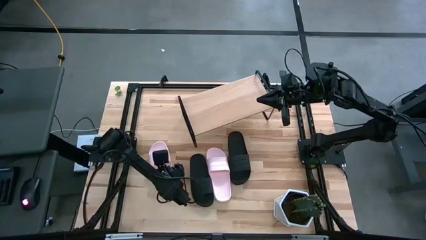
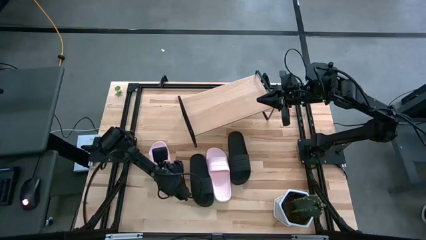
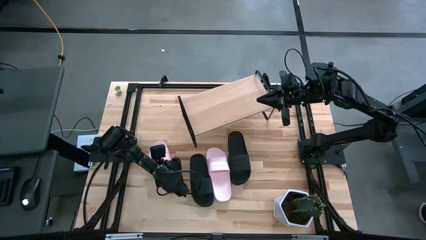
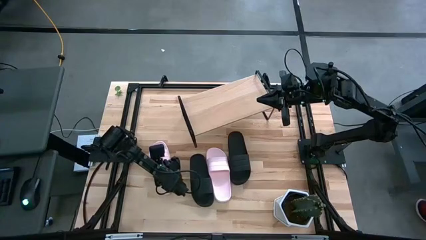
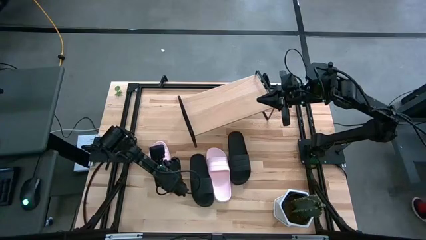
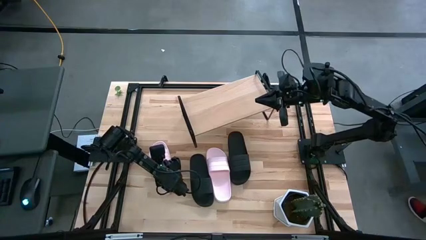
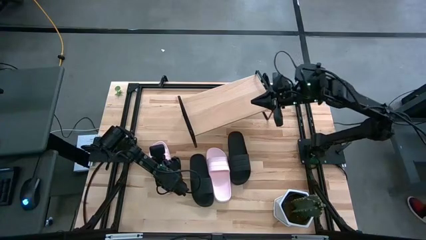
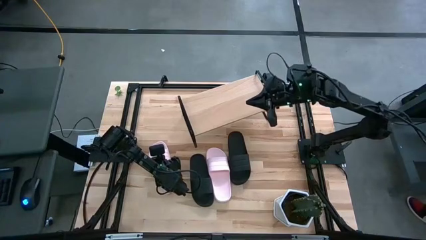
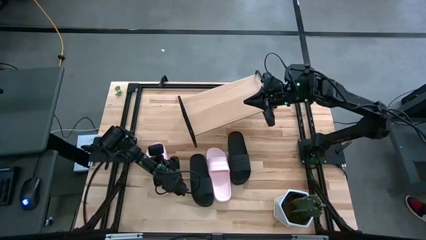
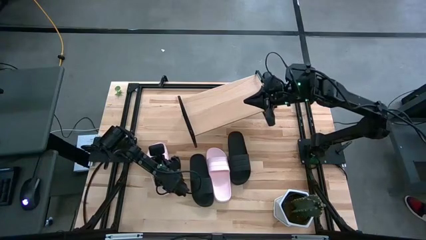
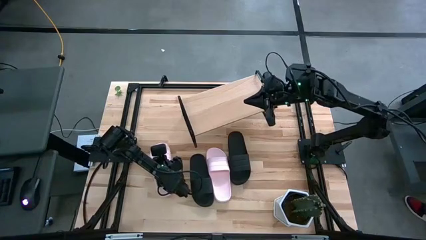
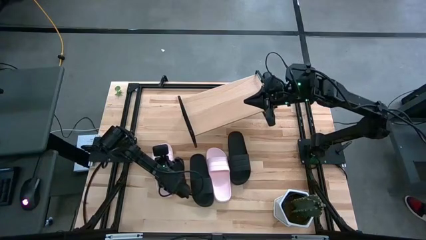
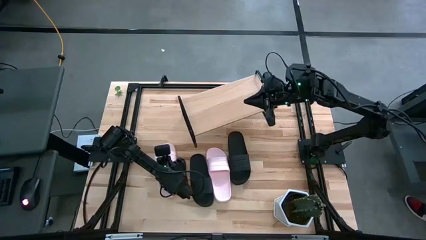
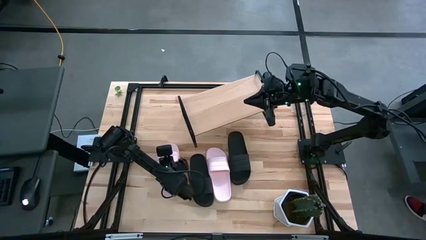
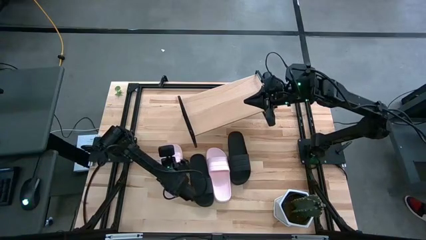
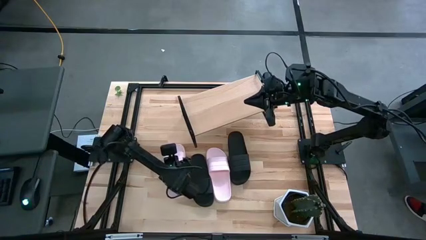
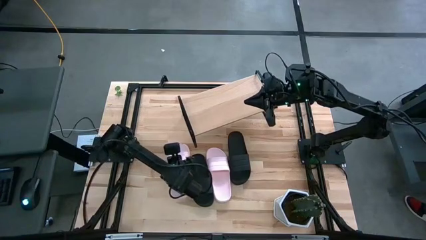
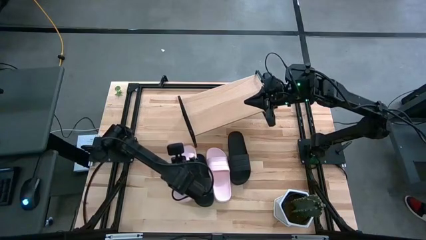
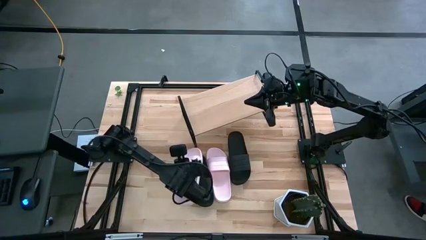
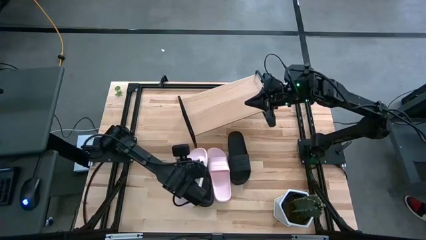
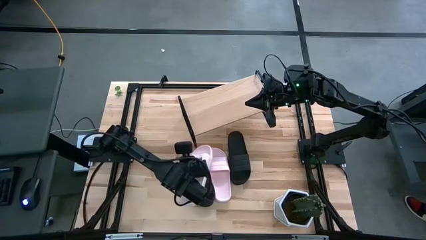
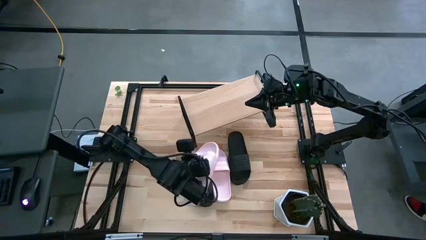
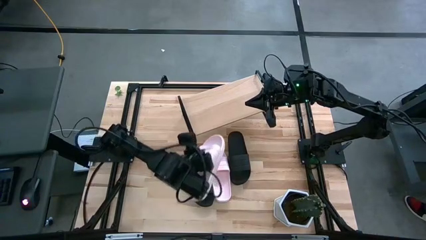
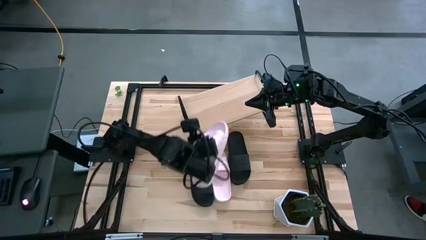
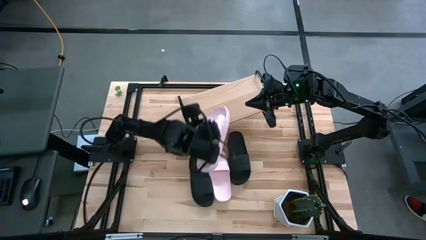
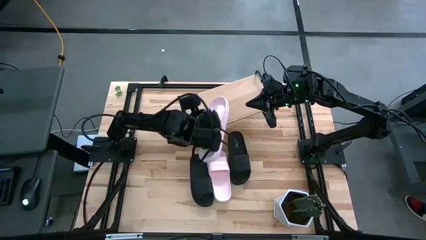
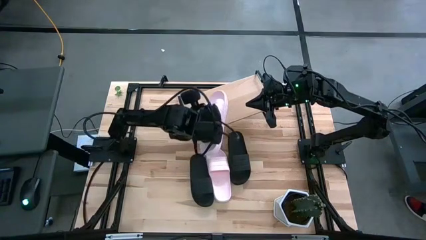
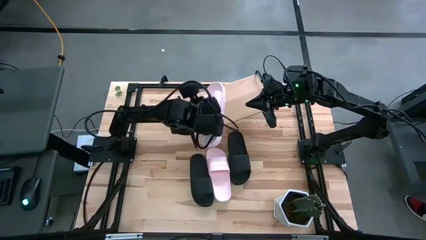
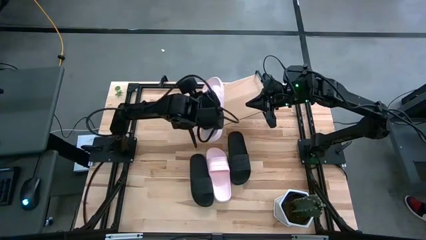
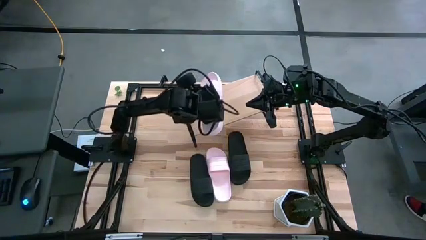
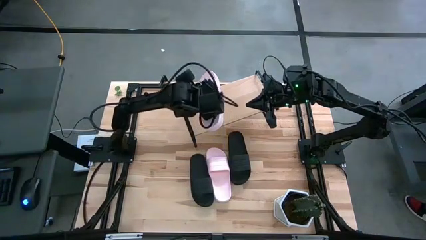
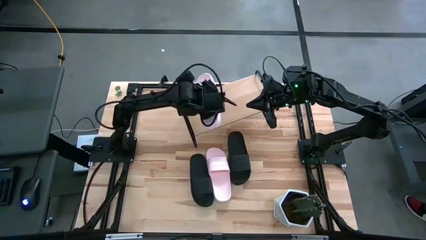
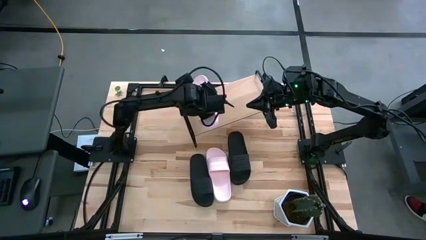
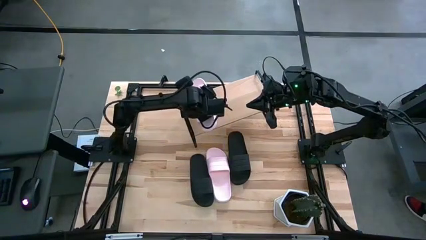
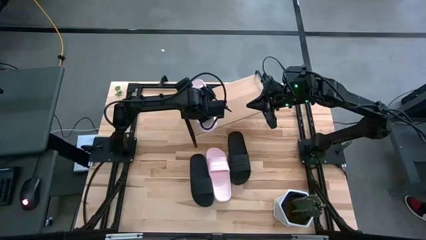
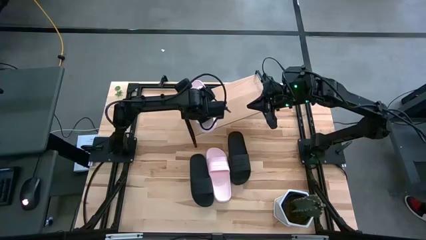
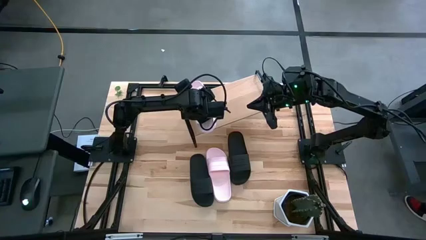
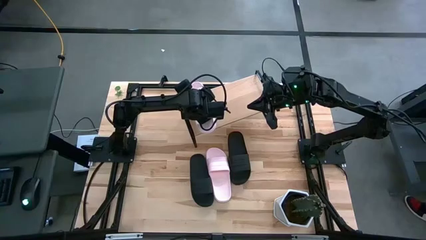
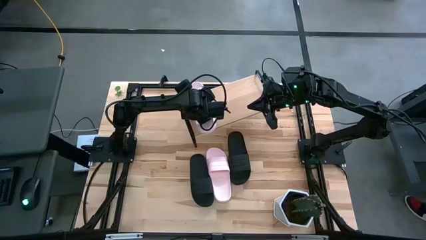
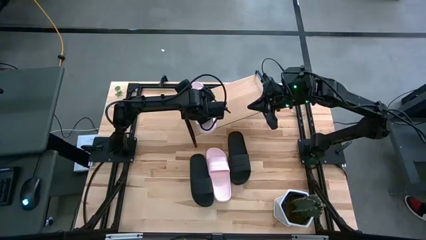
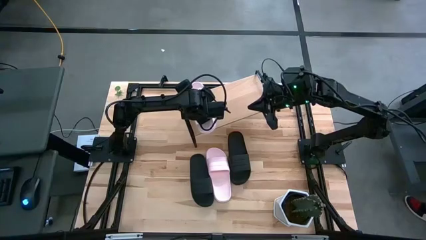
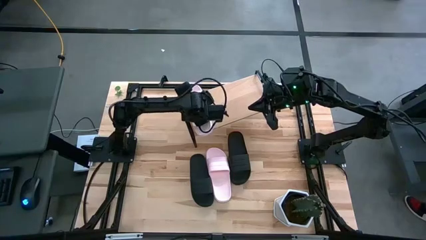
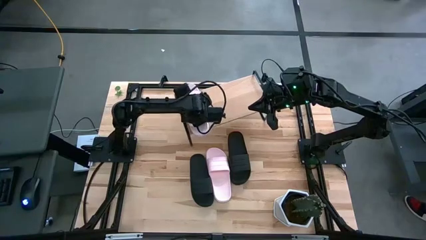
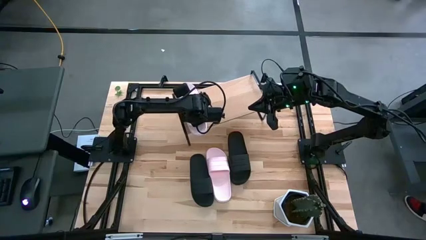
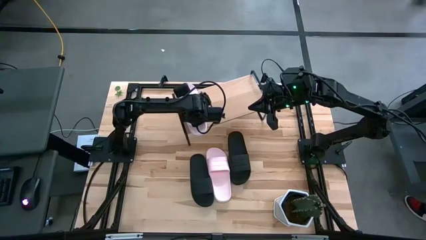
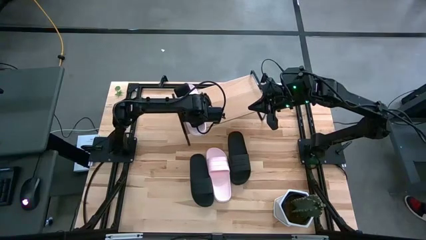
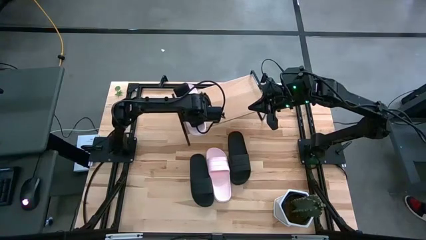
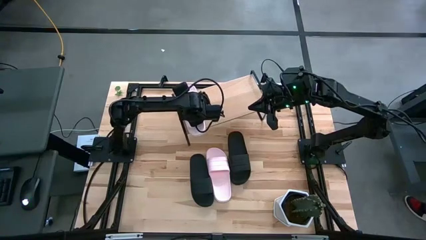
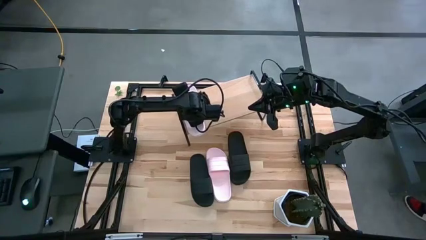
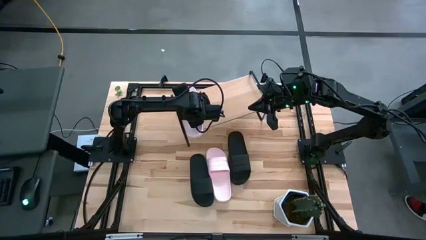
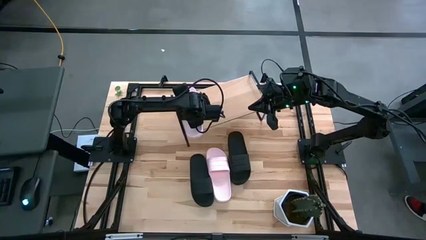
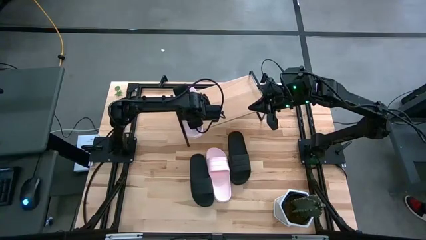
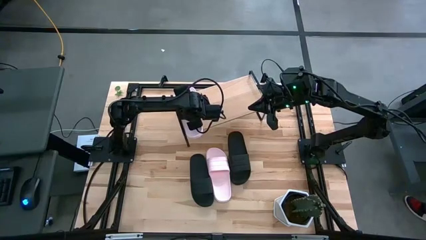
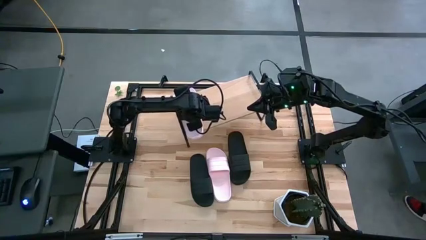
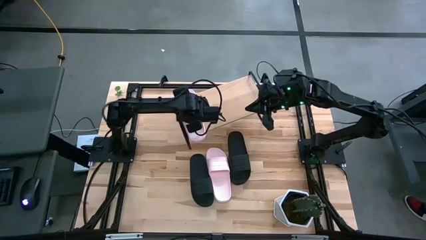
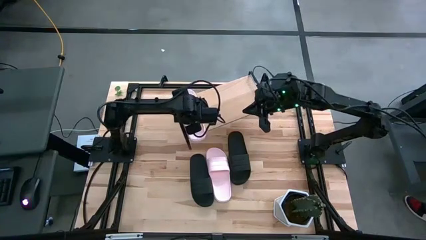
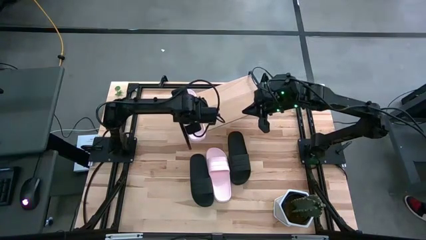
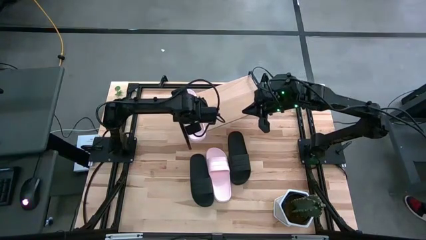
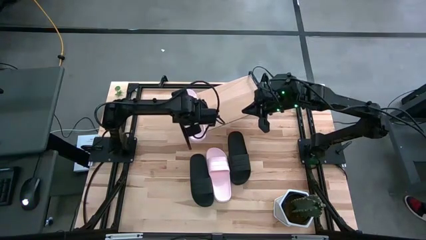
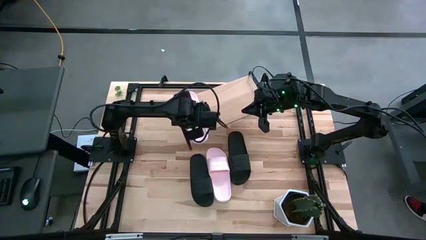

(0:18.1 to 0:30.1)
Task: Pick and place slides into the shelf
Put the left pink slide on the shelf
